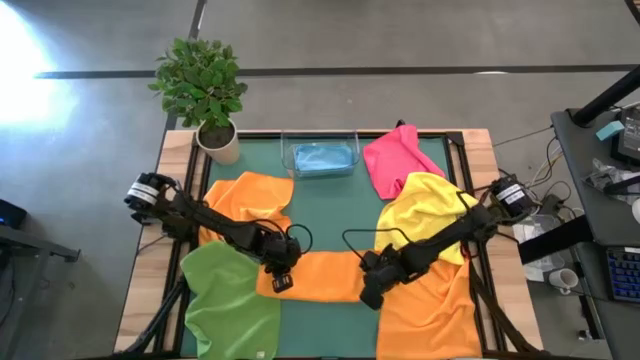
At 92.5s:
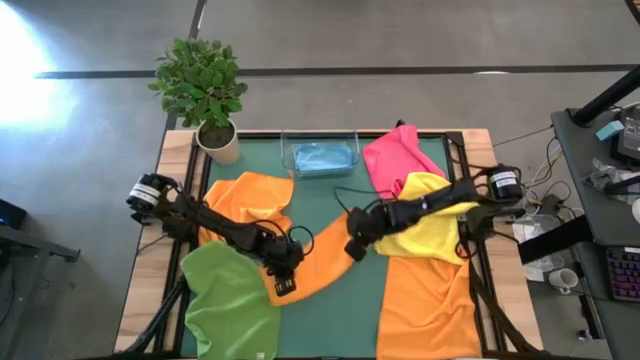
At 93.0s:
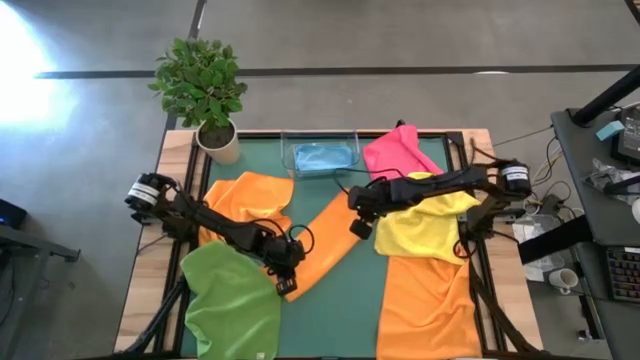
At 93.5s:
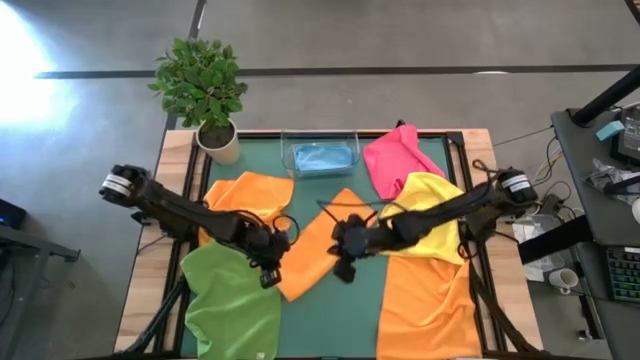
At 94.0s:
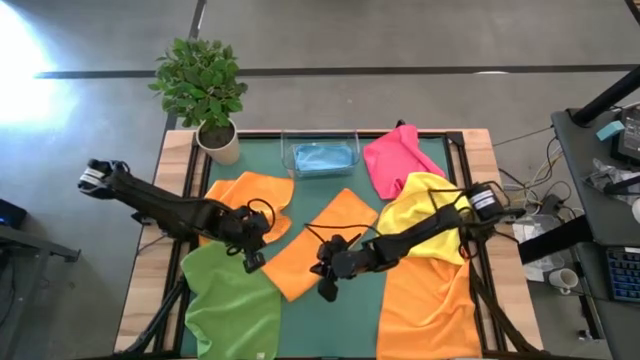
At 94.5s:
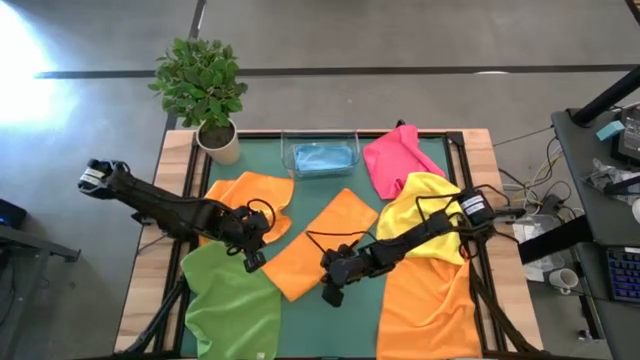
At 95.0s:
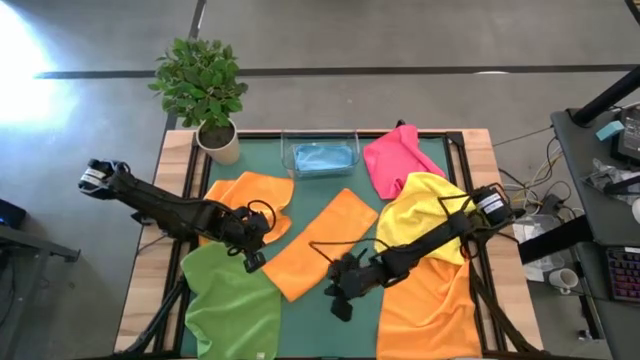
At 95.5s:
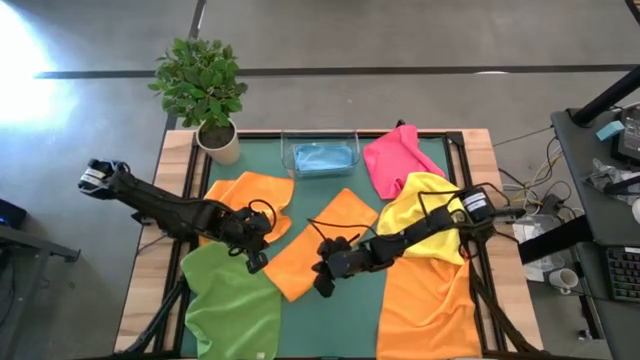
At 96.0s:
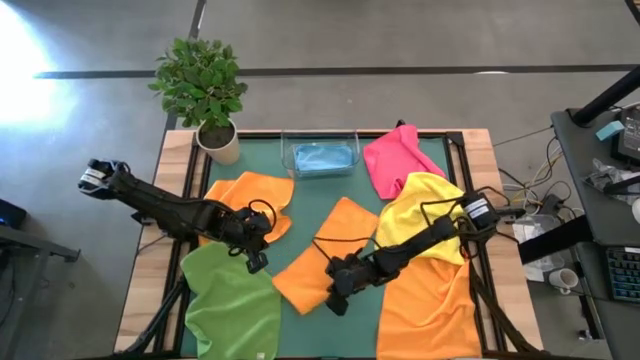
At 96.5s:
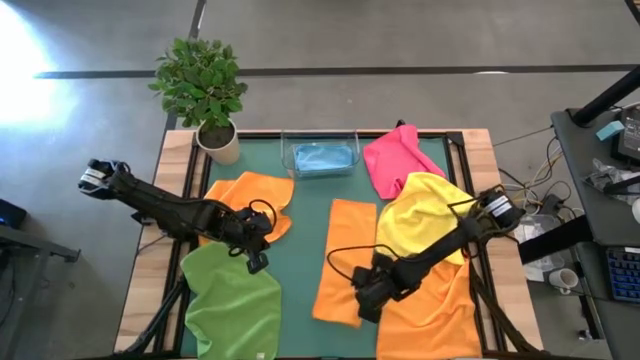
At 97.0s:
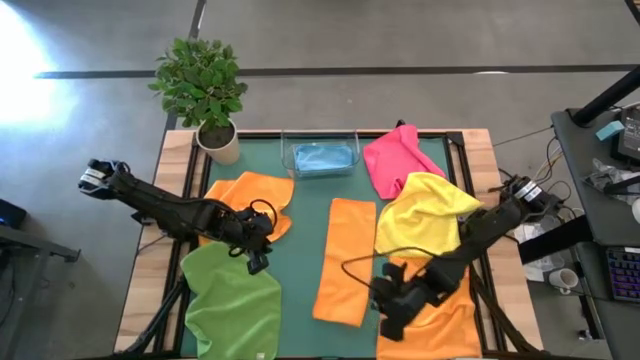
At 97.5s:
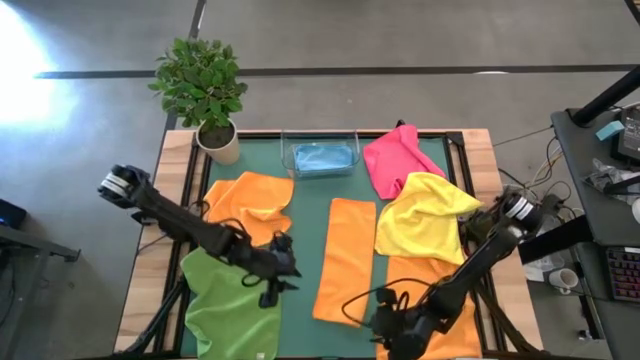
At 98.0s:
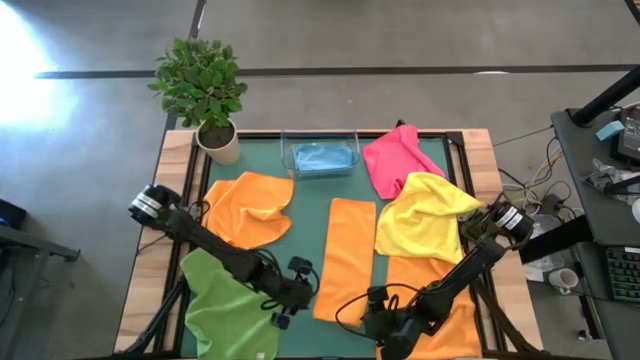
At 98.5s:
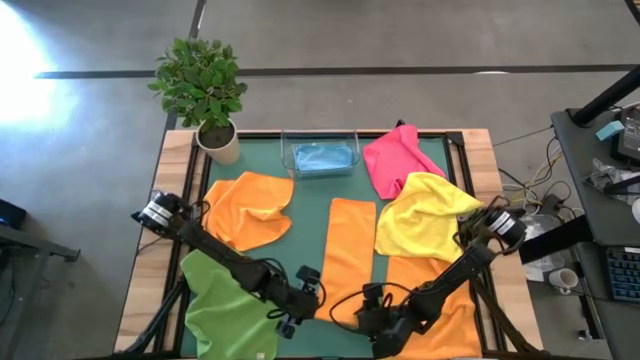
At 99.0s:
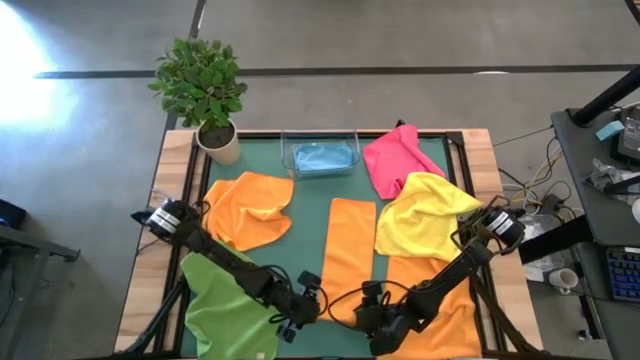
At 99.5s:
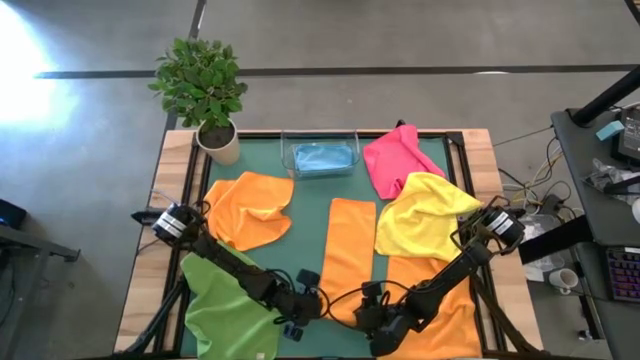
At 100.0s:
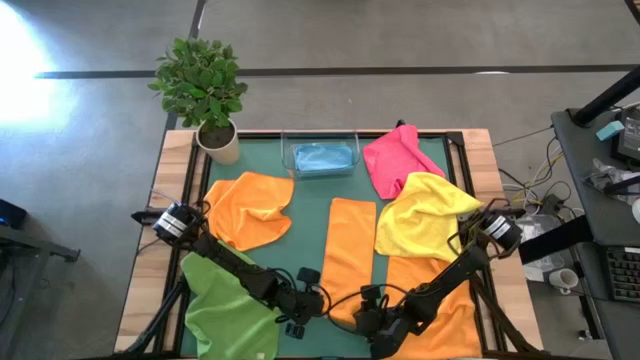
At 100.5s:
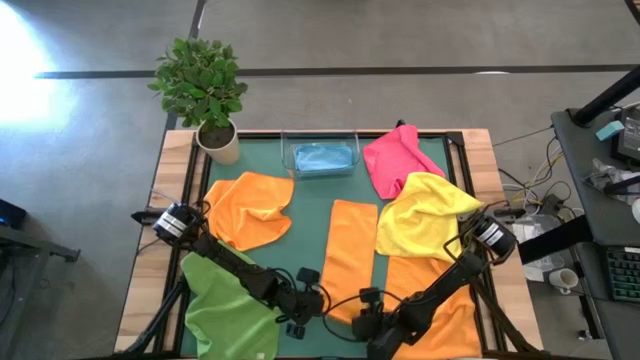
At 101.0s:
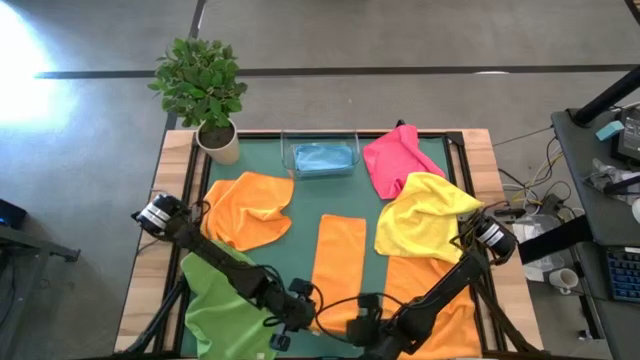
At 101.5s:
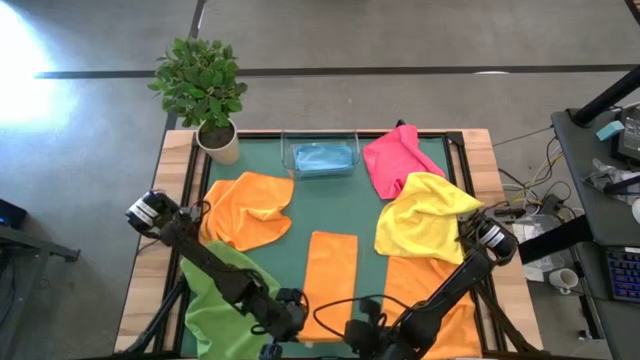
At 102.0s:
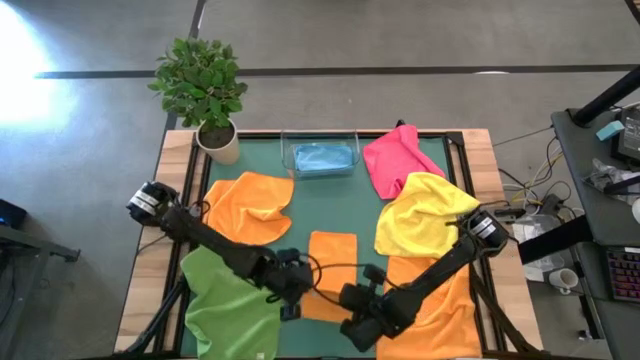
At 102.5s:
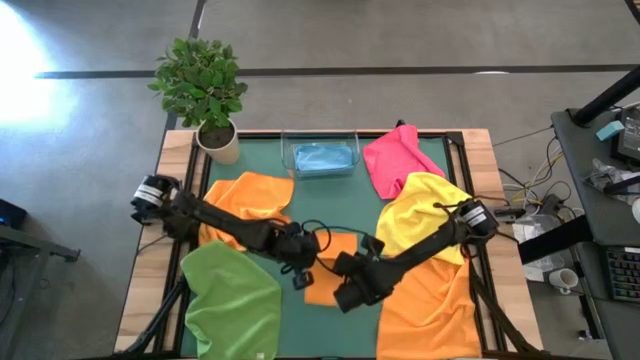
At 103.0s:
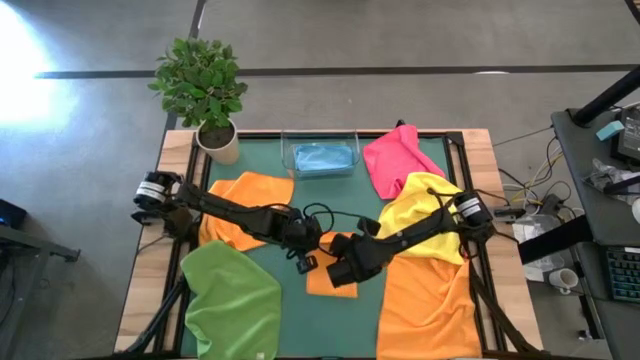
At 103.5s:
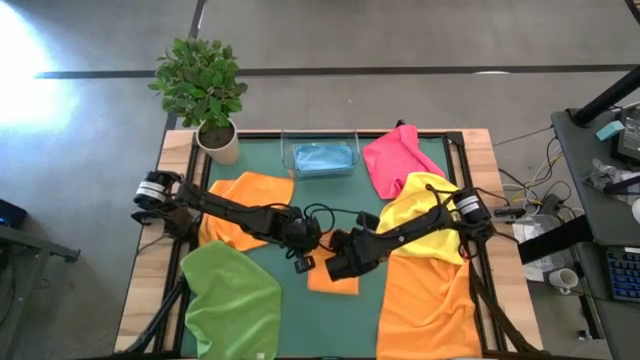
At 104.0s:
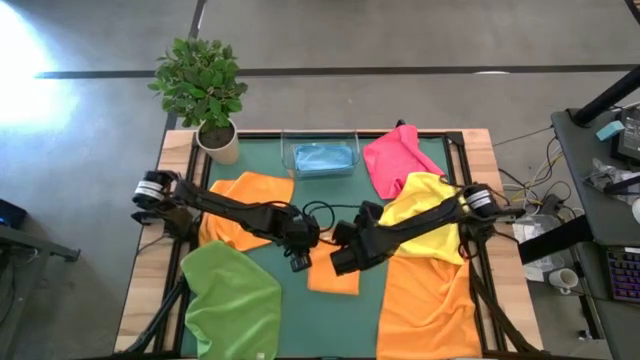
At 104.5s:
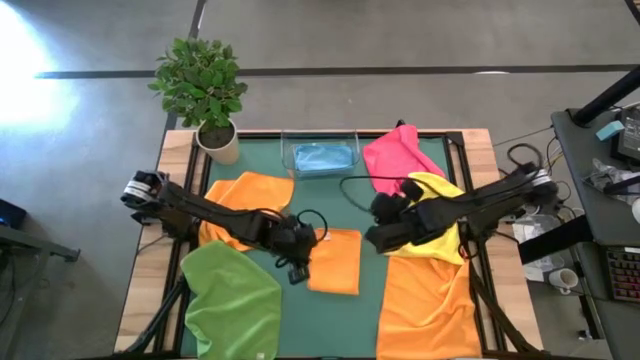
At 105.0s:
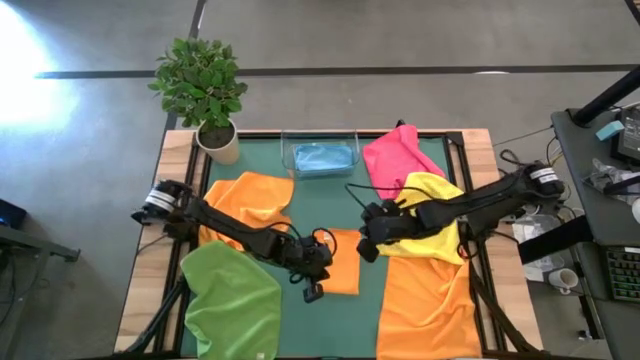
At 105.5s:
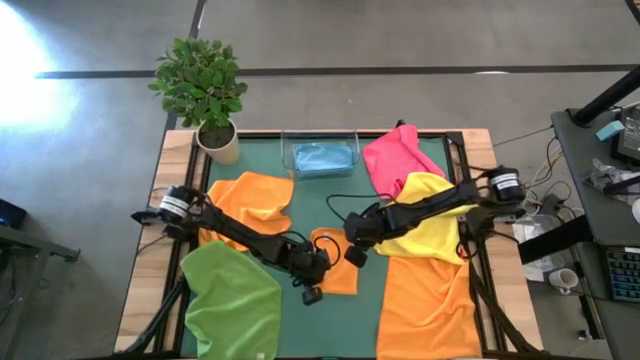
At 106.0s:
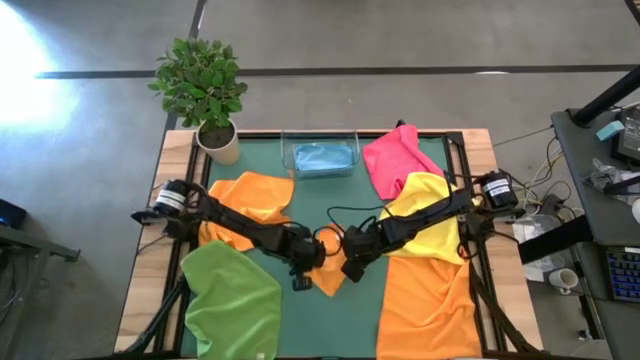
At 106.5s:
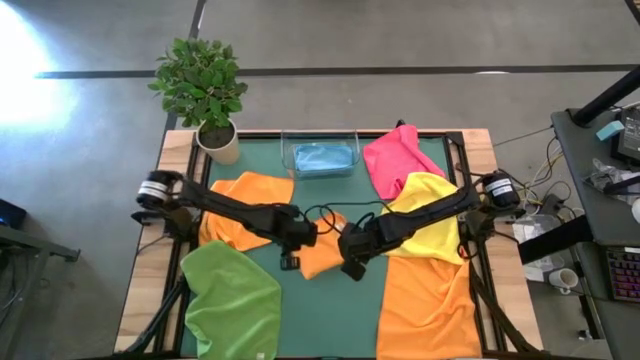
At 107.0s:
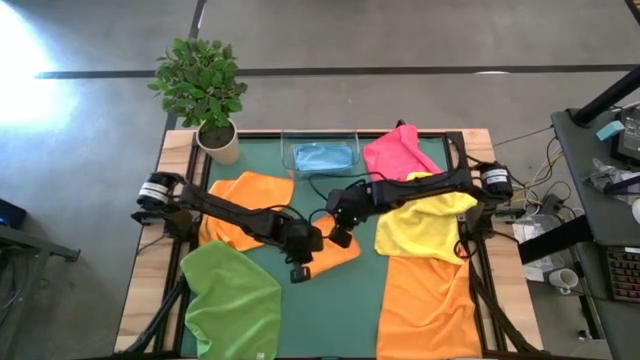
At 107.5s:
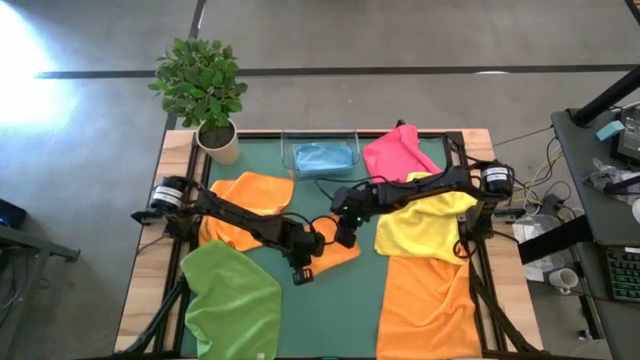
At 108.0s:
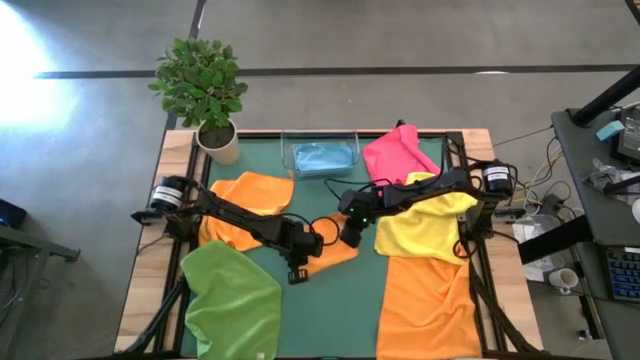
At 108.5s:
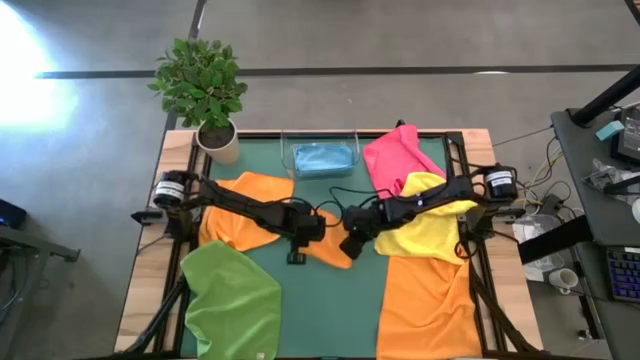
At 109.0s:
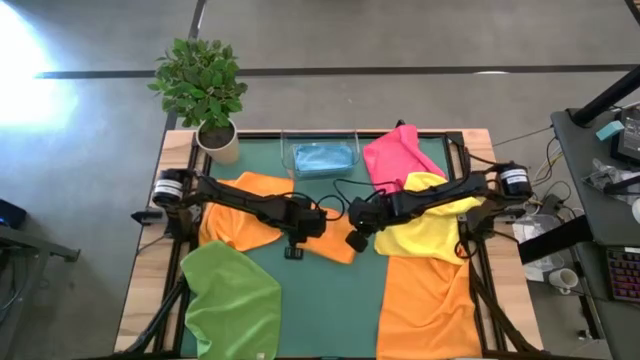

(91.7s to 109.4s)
Task: Fold microfiber towels
Fold the right orange microfiber towel
